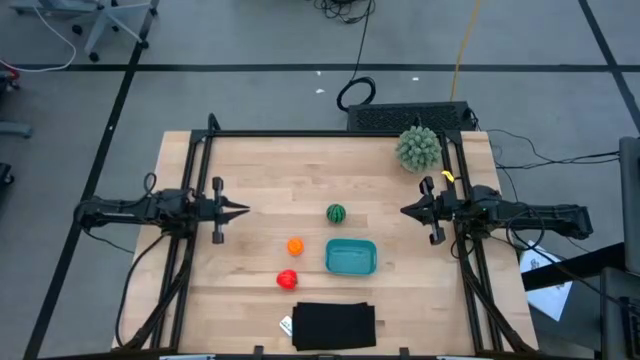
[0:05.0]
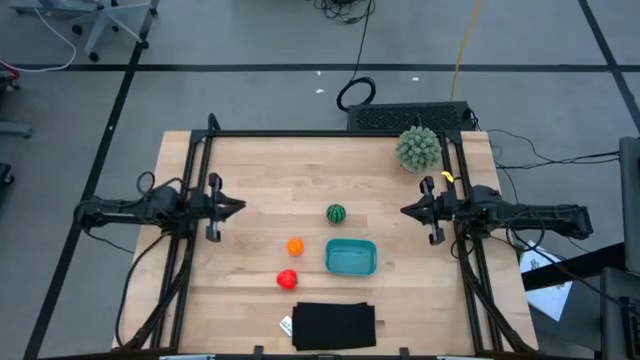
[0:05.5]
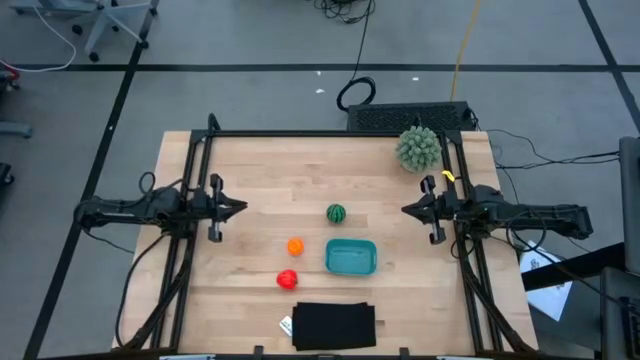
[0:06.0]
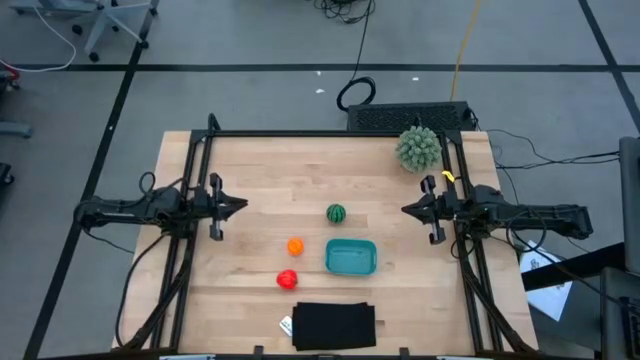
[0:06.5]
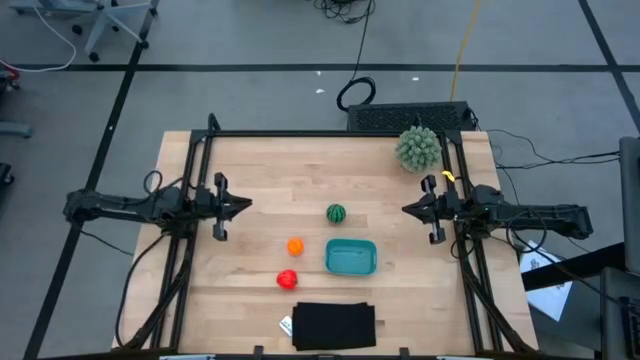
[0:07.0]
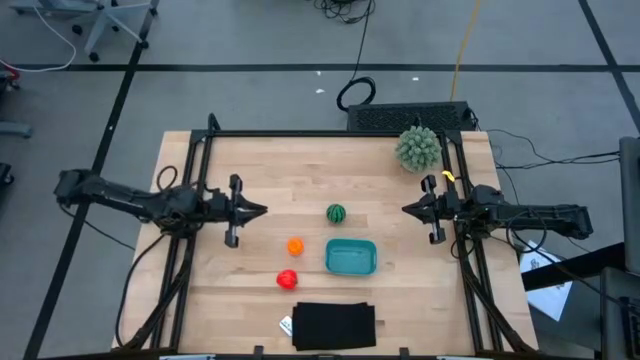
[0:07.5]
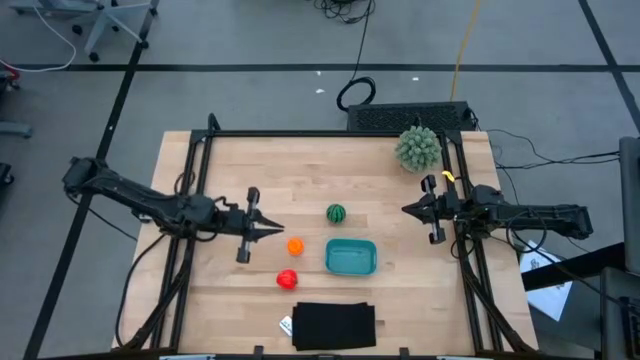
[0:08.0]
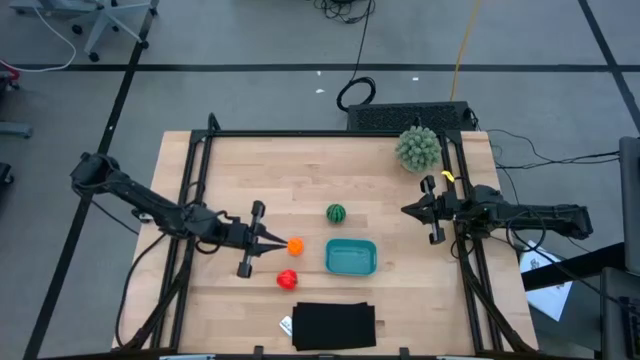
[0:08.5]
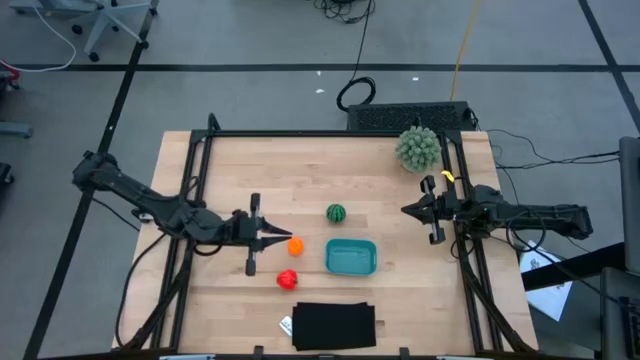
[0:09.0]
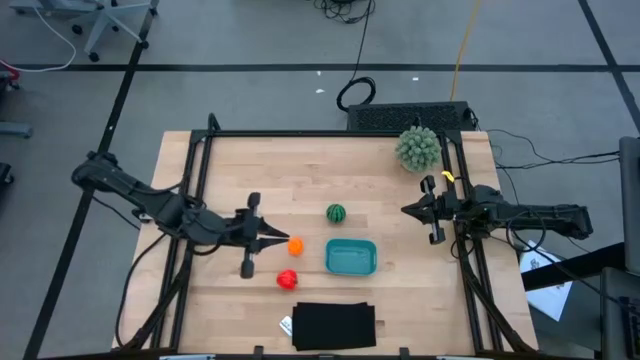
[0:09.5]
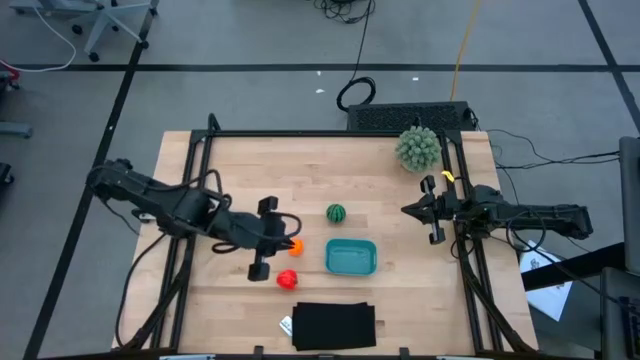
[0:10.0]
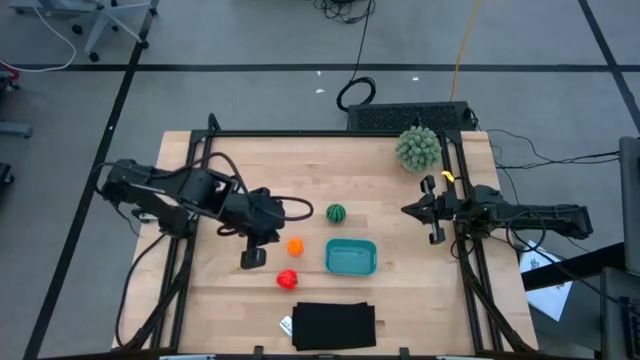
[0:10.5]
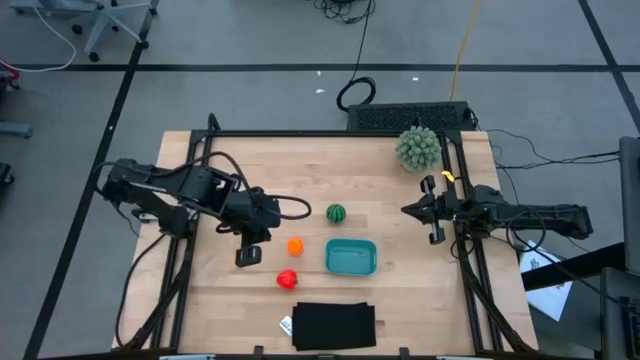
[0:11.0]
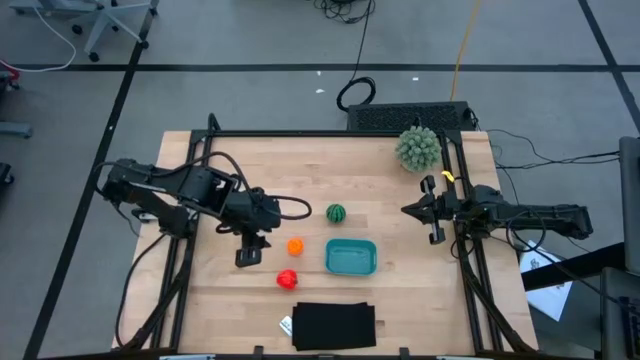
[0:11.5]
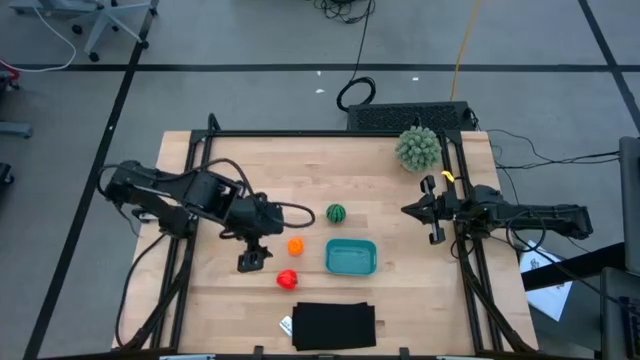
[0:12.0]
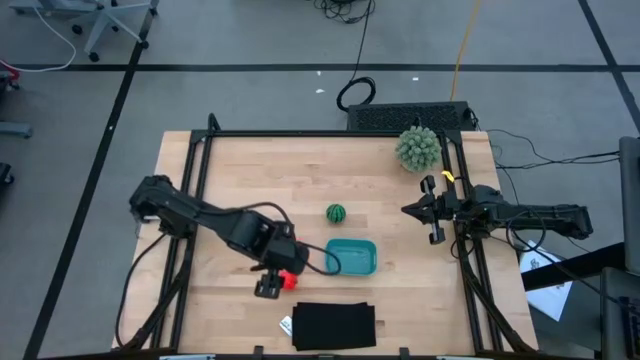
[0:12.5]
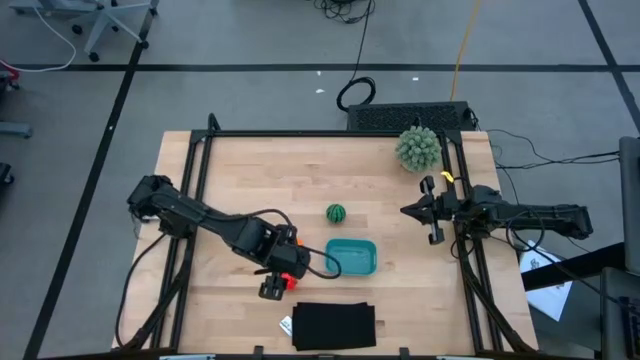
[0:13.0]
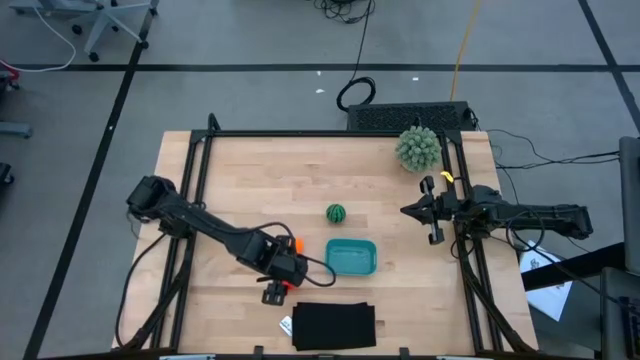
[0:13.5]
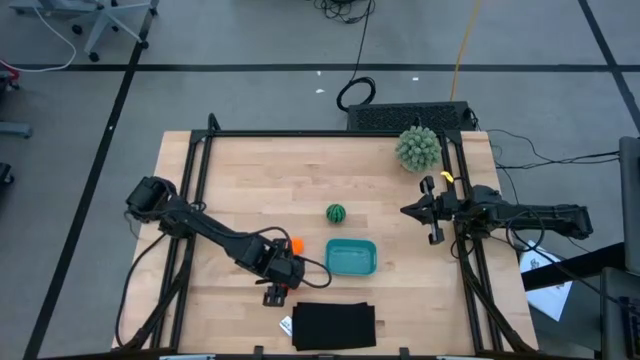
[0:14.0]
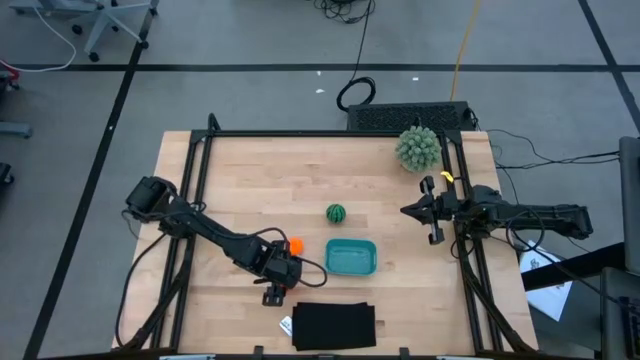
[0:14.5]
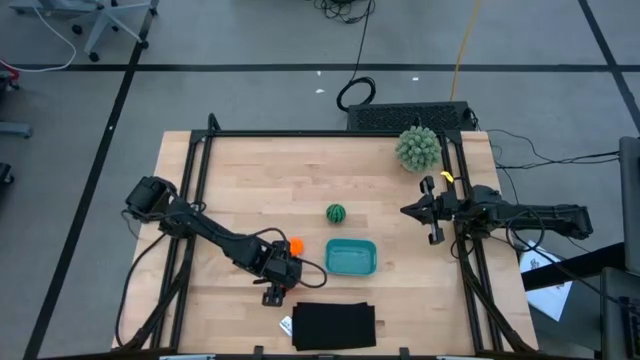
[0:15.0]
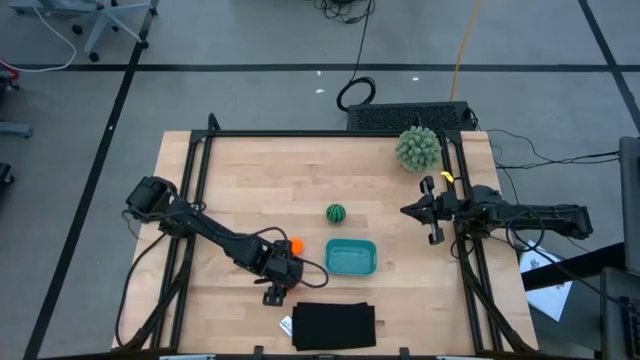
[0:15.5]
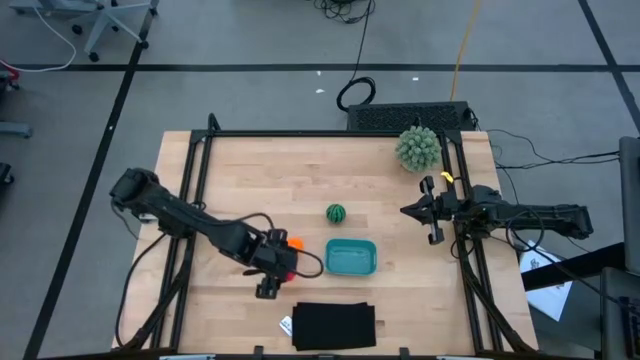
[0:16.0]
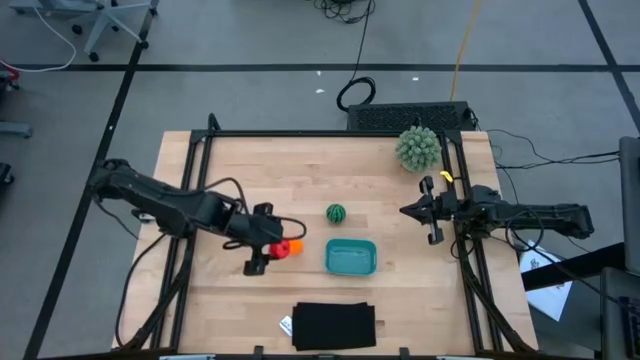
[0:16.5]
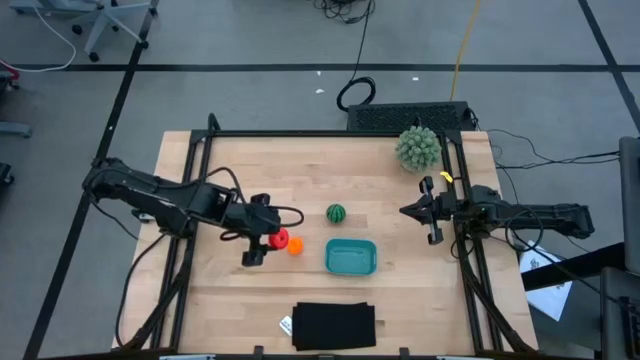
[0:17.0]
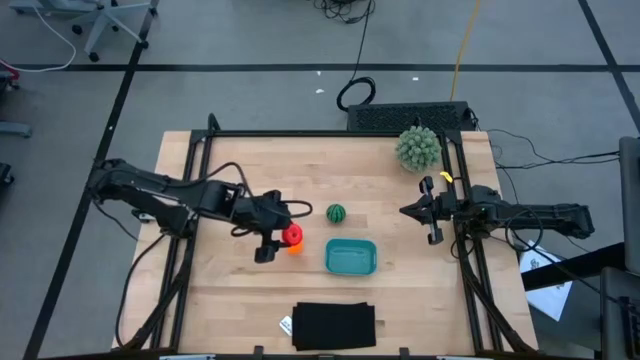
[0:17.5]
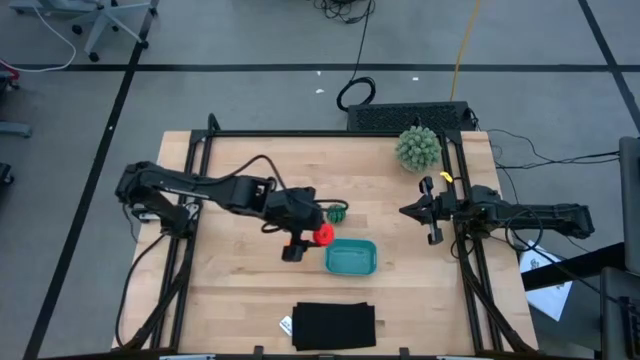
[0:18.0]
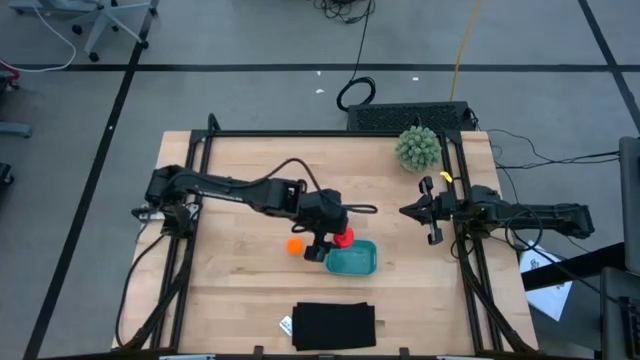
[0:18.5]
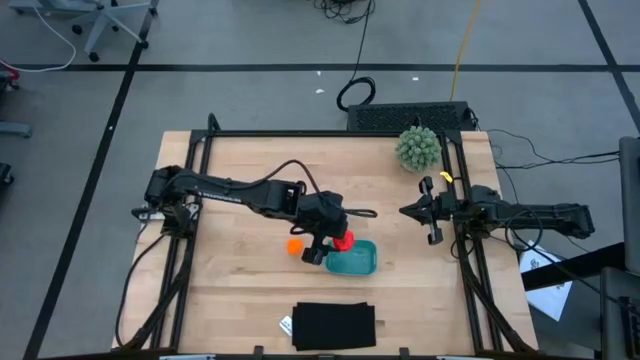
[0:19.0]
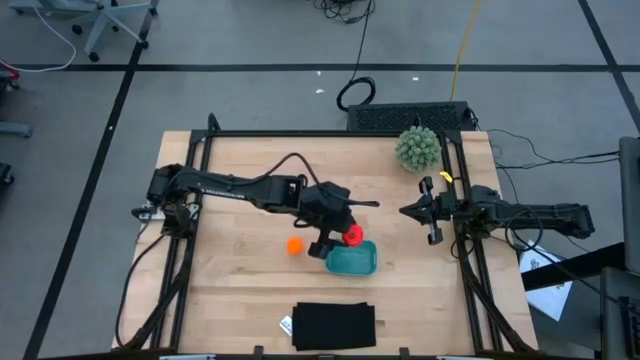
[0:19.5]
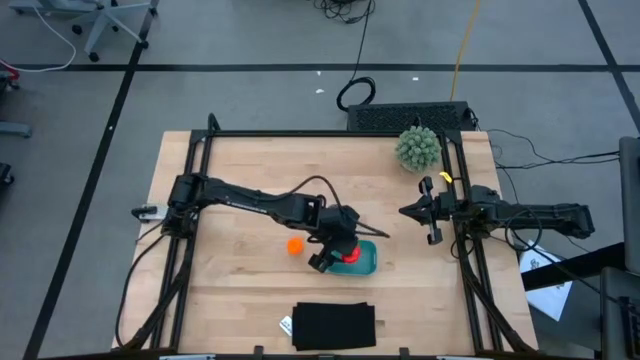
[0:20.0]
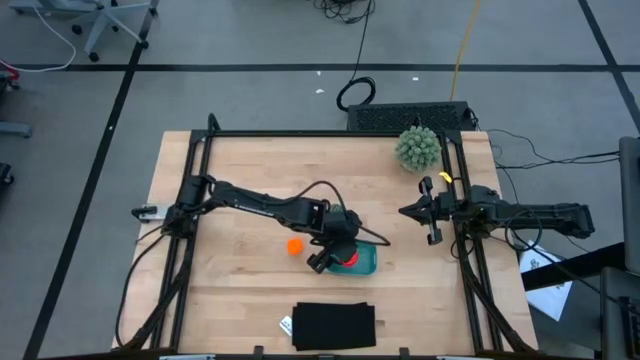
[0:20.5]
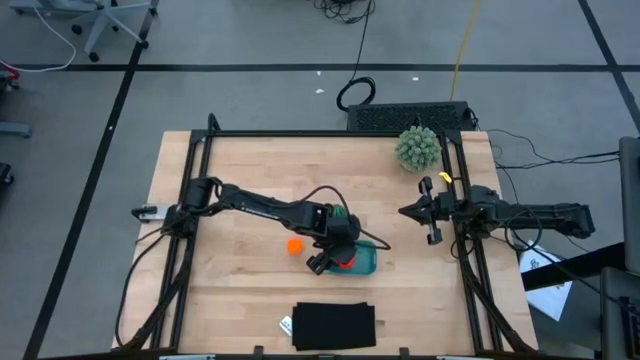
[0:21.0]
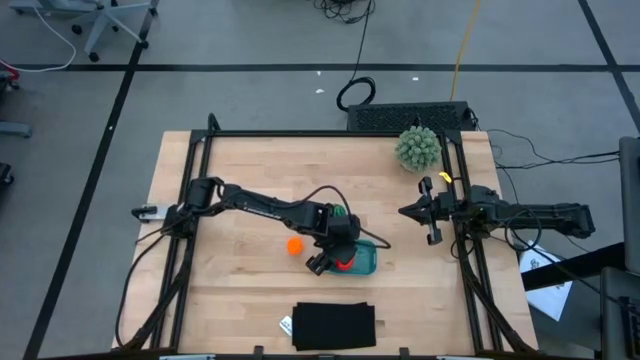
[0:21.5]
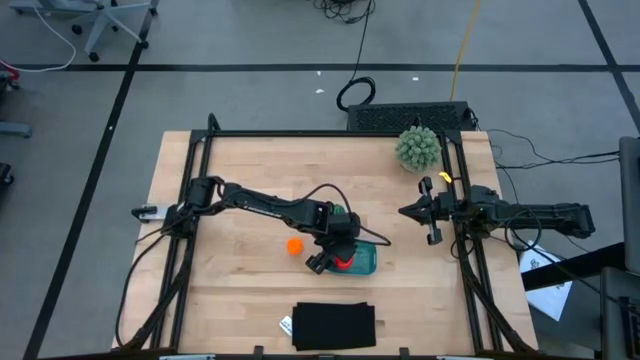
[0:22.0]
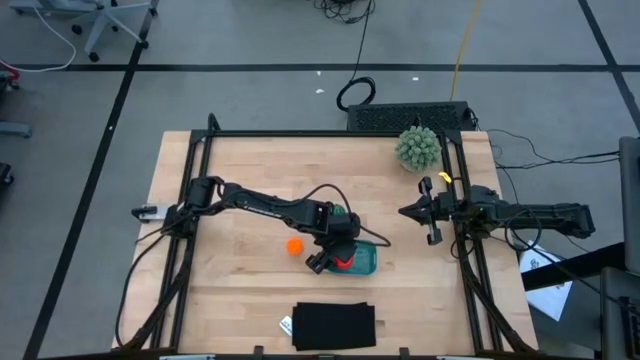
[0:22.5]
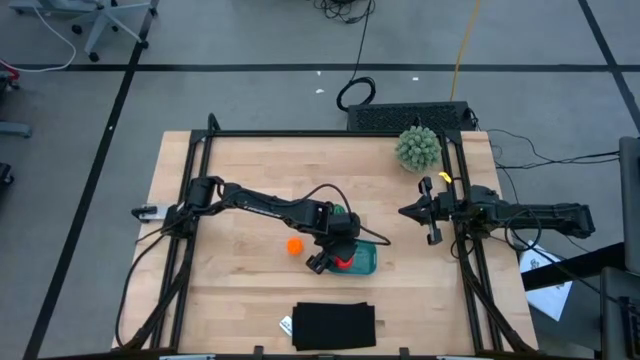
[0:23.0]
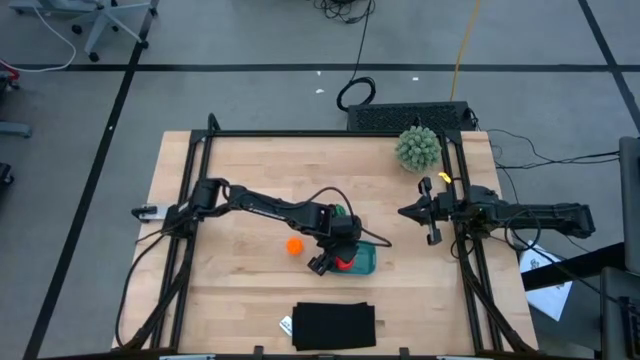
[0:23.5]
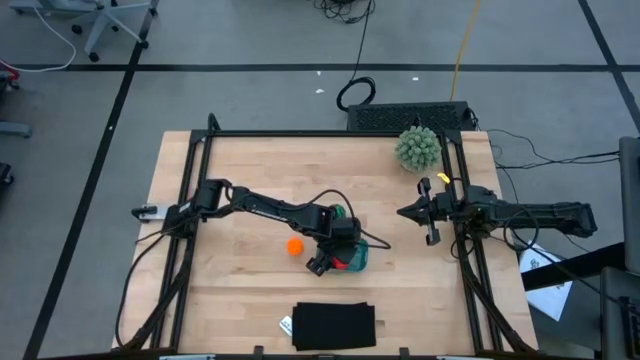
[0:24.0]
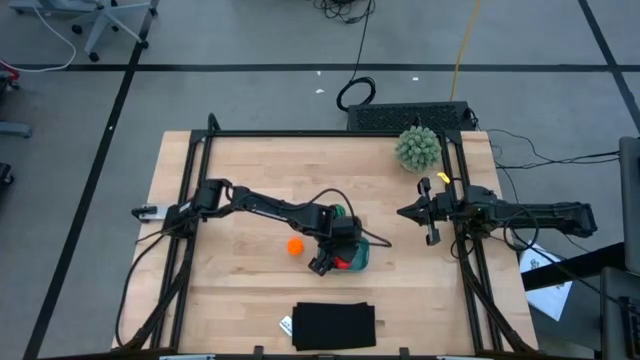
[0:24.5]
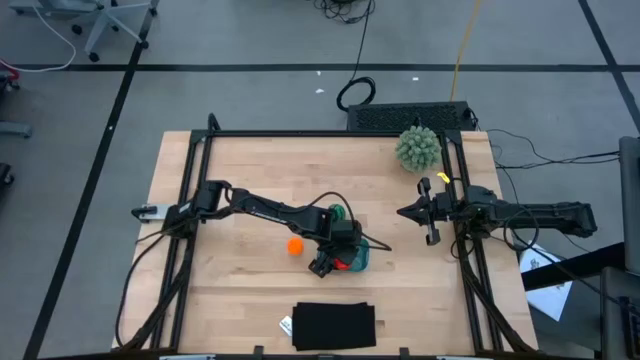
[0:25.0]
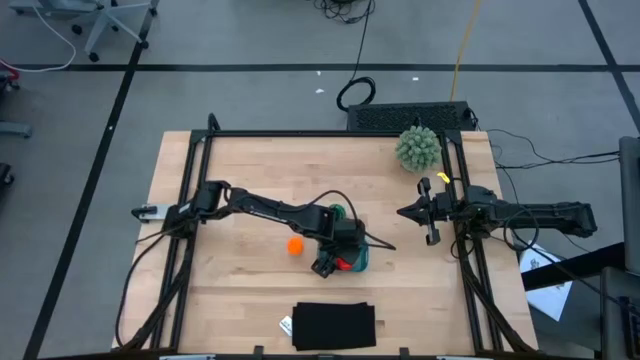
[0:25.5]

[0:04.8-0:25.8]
Task: Pick and placing Produce into tupperware
Put the apple into the blue bin

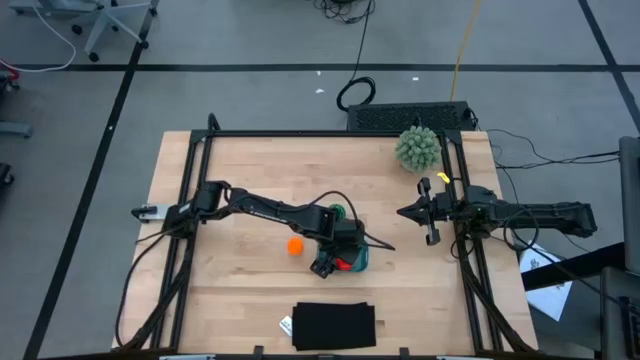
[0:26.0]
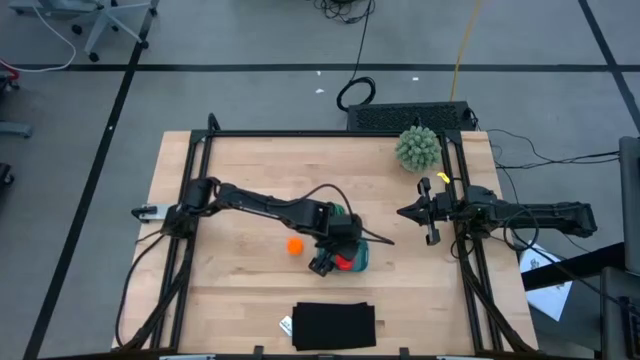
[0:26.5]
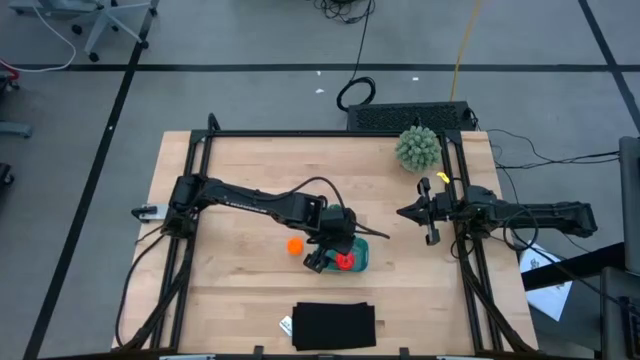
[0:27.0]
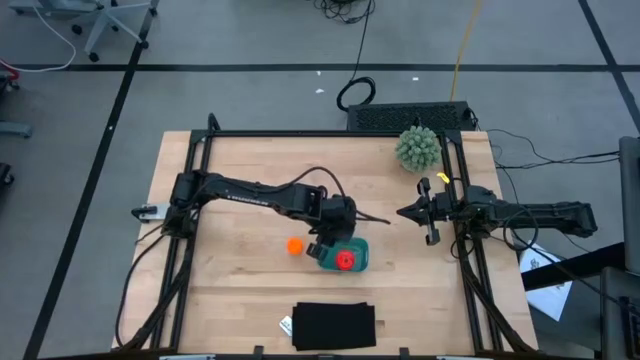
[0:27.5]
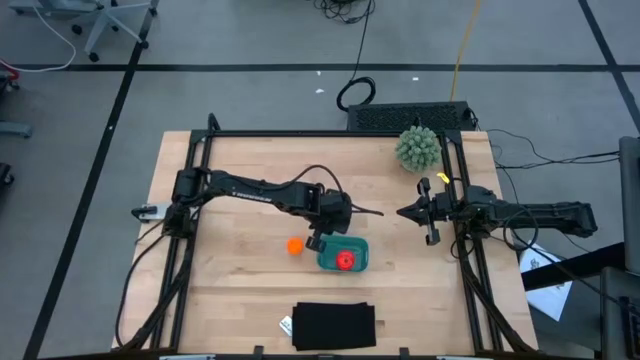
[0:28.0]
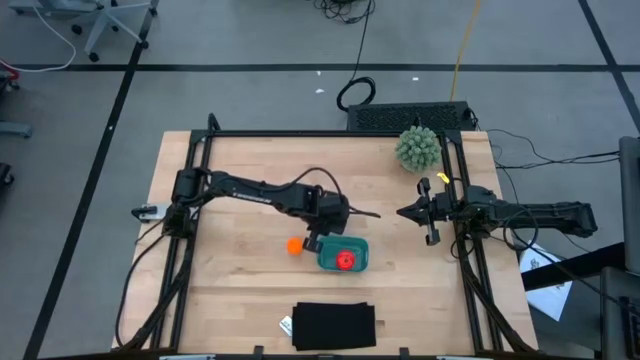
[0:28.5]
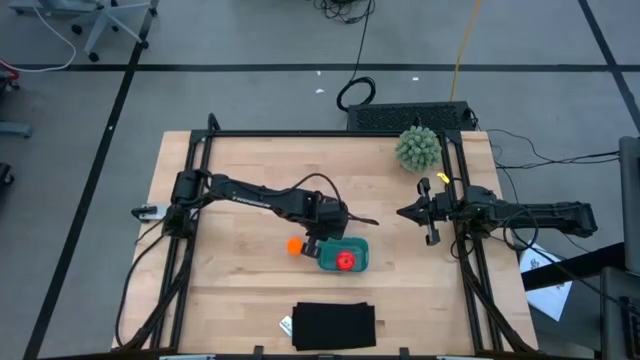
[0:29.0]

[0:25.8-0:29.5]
Adjust the blue bin
